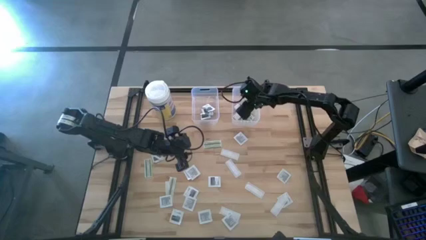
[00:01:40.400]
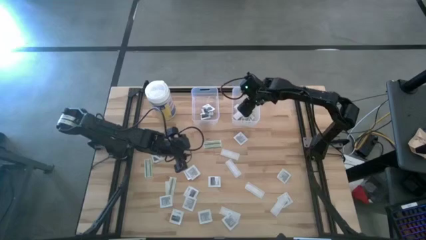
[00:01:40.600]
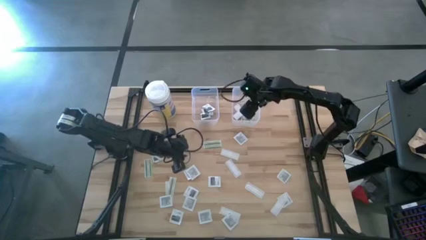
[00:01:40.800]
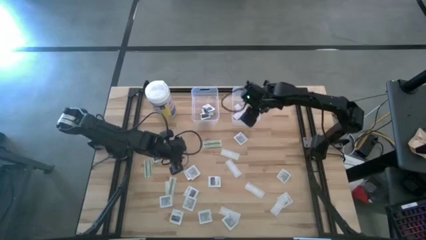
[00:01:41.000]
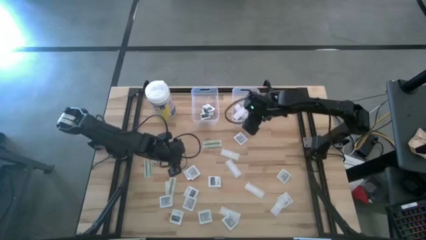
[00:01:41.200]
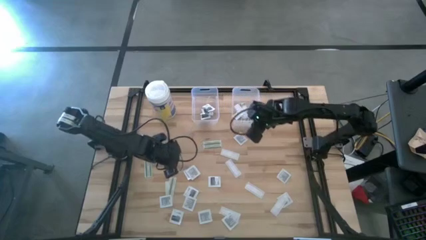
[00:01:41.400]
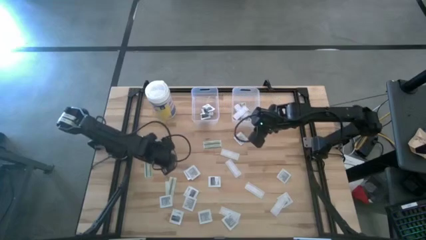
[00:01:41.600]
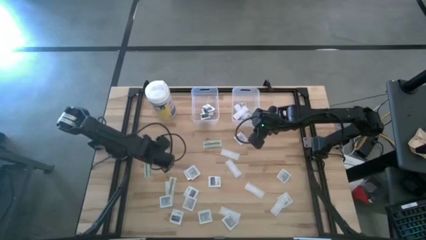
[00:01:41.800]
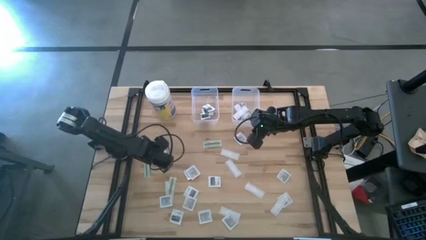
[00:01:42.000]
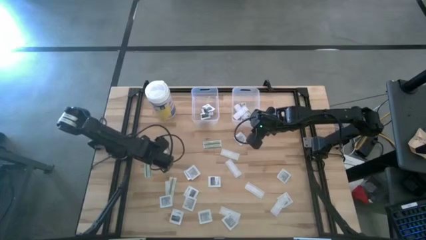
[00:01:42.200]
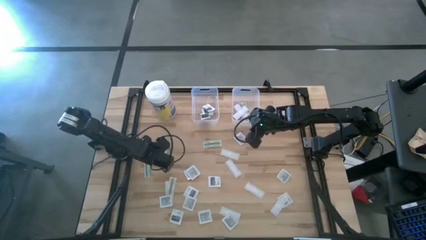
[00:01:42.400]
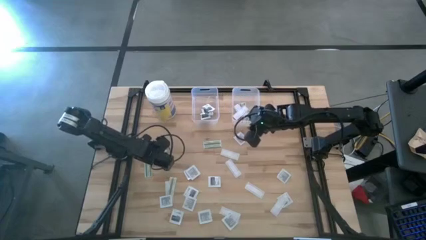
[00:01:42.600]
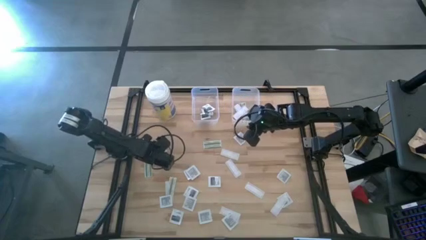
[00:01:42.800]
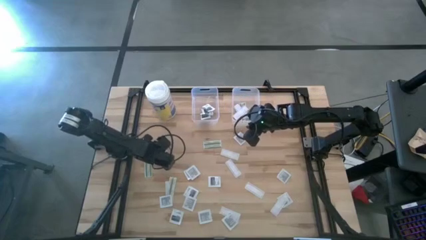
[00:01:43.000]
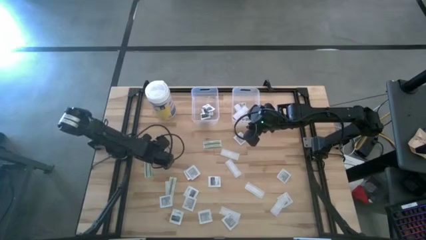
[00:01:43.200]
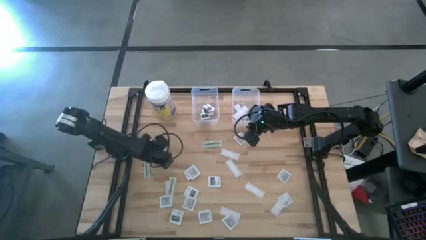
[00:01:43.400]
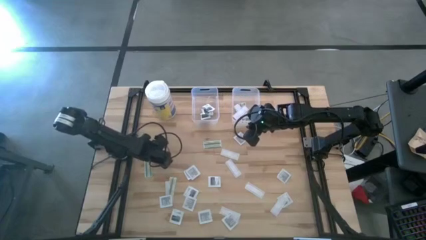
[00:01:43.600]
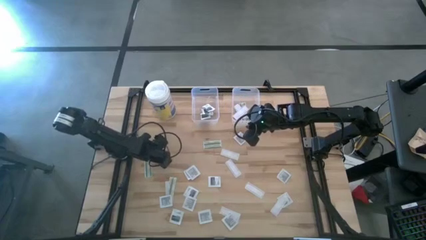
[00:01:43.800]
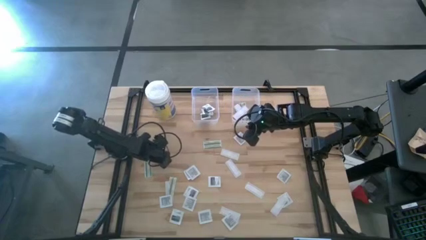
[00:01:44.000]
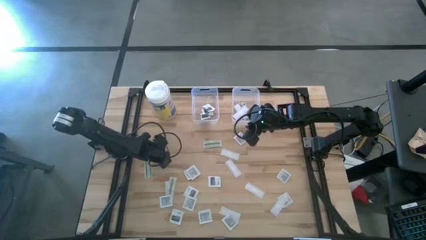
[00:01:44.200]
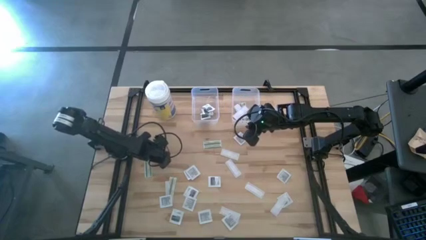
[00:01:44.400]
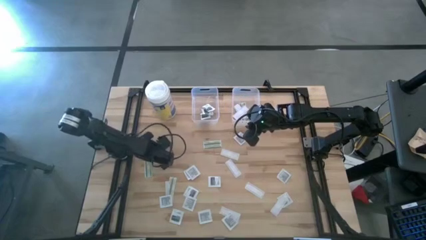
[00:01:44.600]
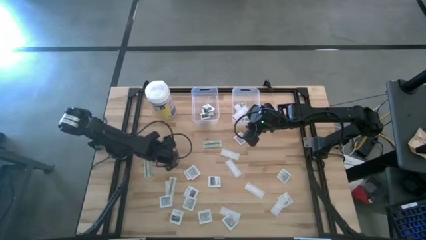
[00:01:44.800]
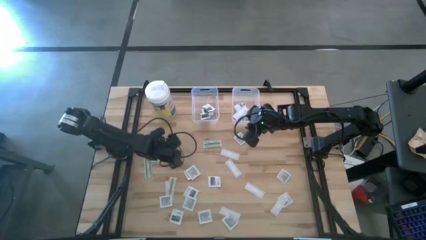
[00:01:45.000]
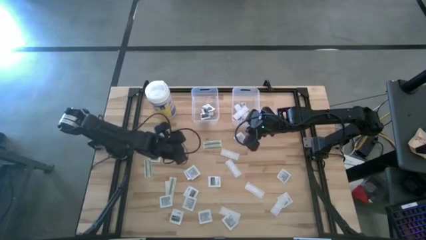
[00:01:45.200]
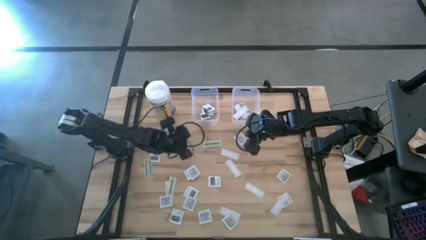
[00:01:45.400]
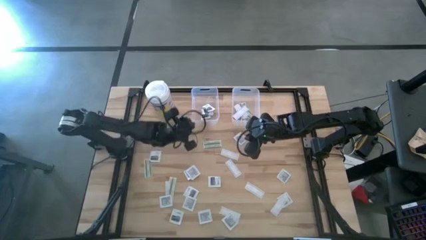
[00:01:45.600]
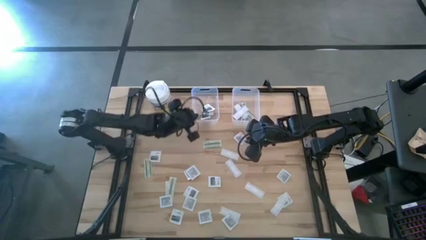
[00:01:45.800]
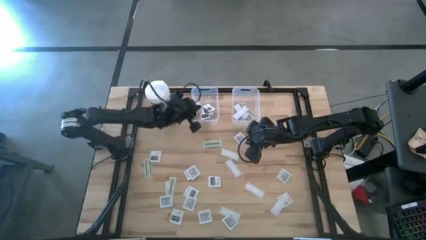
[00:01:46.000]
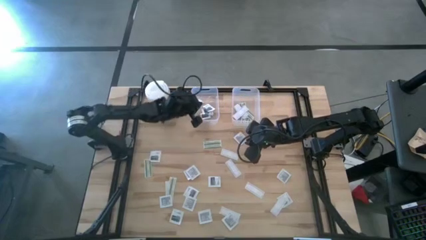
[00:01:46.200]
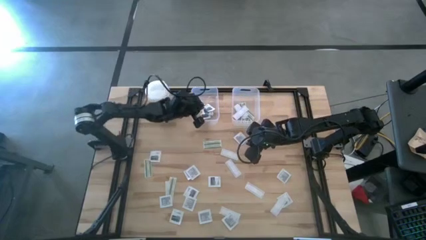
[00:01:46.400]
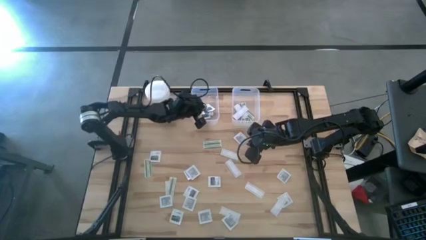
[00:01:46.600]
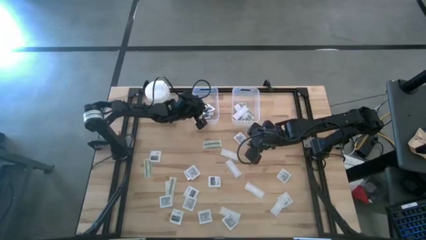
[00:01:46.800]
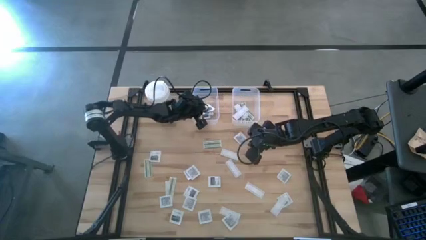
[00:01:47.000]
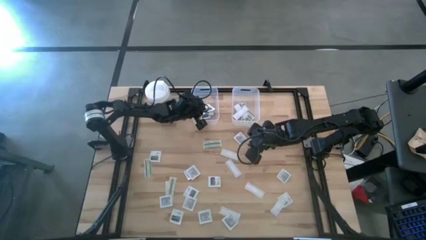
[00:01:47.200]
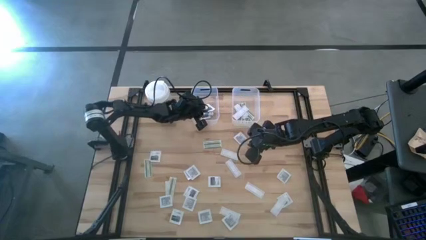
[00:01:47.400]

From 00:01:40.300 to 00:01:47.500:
Task: Pick & Place First Aid Supplies
Put the towelette pack into the left transparent bin

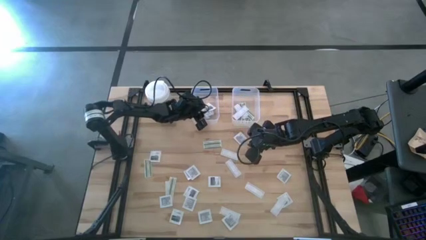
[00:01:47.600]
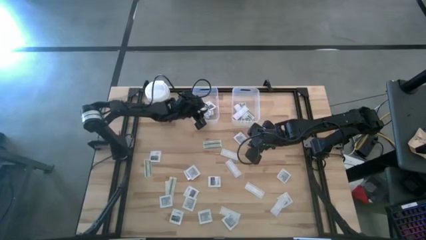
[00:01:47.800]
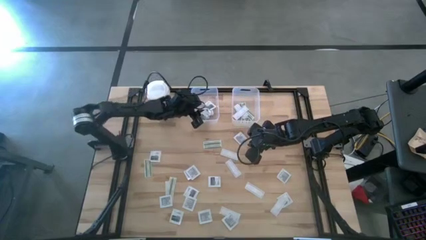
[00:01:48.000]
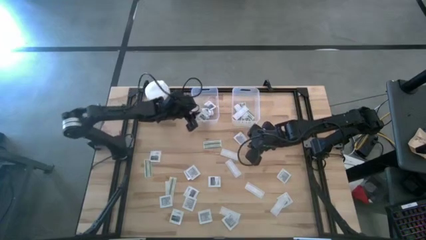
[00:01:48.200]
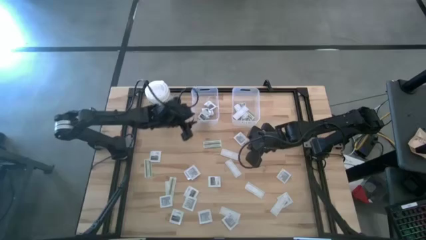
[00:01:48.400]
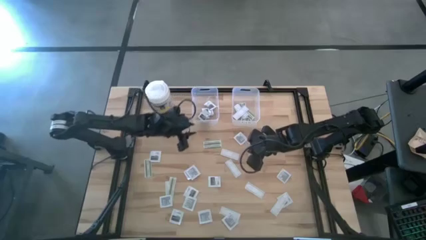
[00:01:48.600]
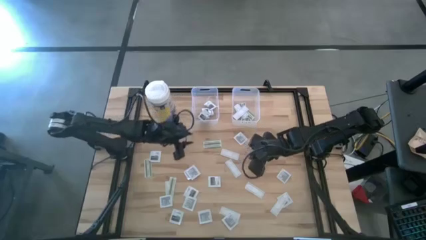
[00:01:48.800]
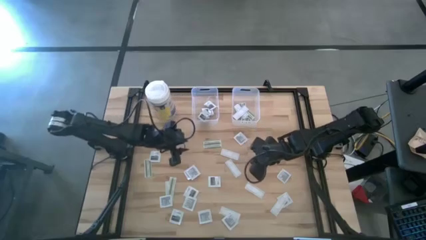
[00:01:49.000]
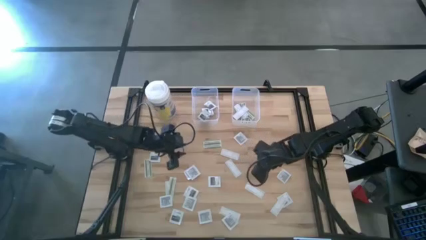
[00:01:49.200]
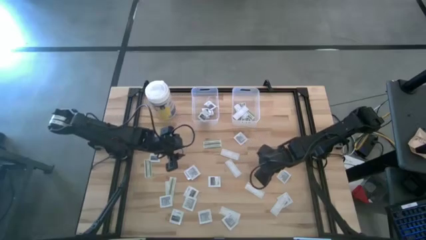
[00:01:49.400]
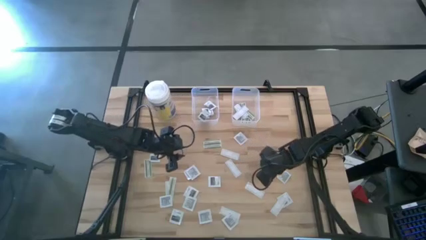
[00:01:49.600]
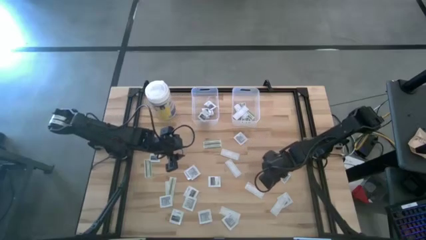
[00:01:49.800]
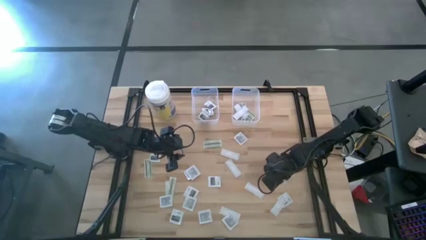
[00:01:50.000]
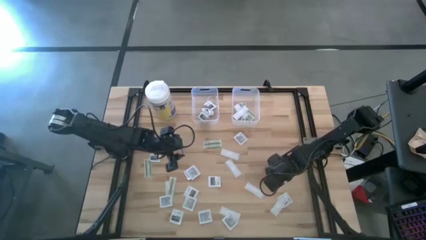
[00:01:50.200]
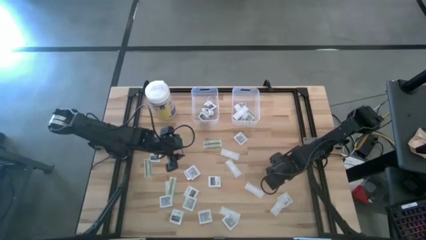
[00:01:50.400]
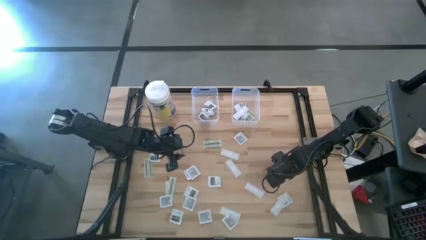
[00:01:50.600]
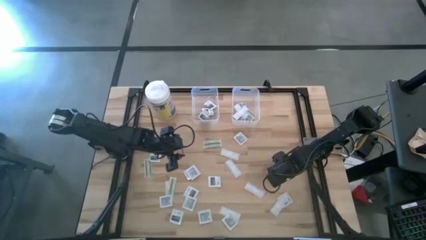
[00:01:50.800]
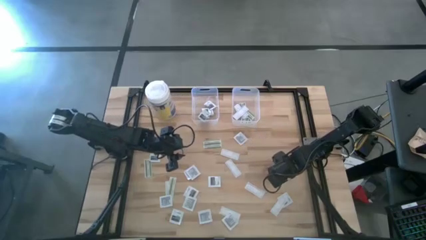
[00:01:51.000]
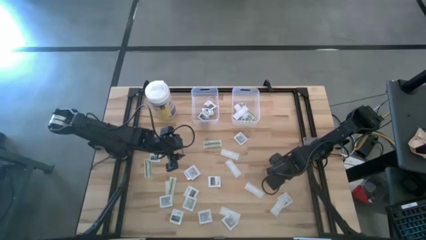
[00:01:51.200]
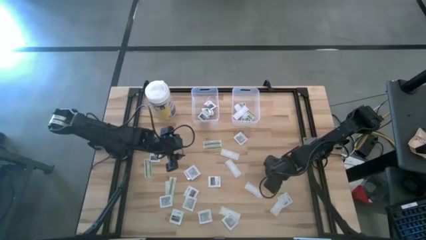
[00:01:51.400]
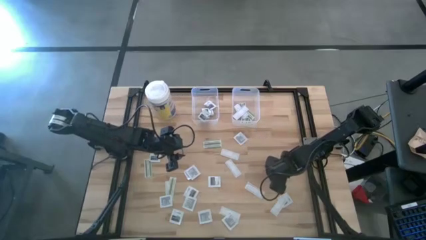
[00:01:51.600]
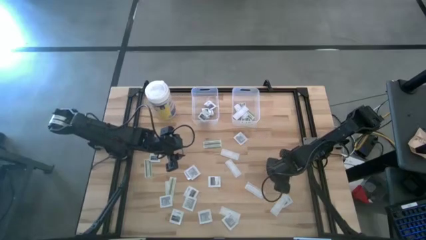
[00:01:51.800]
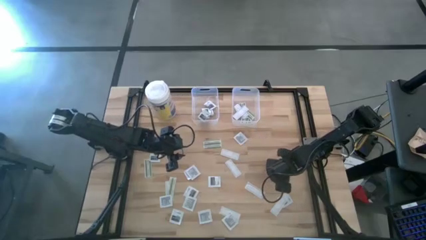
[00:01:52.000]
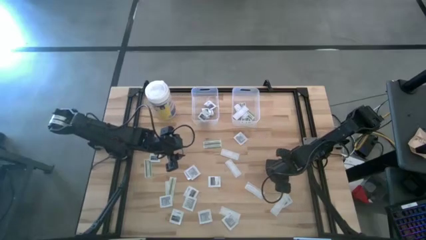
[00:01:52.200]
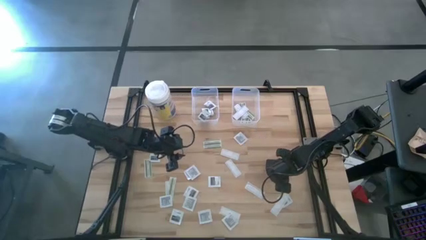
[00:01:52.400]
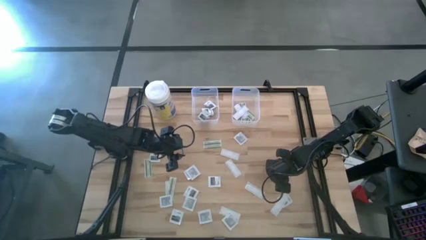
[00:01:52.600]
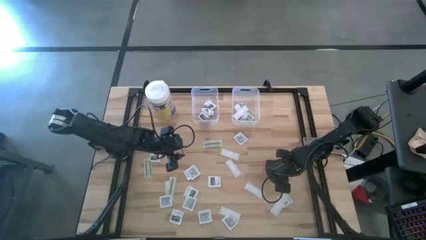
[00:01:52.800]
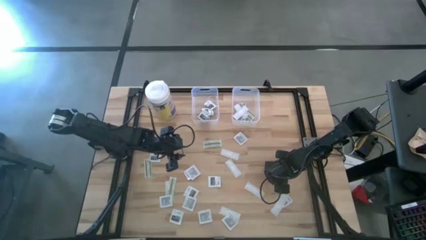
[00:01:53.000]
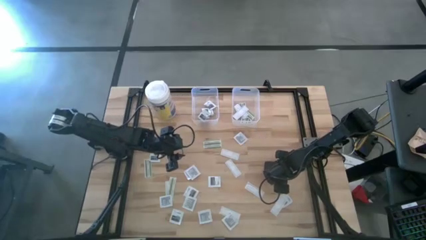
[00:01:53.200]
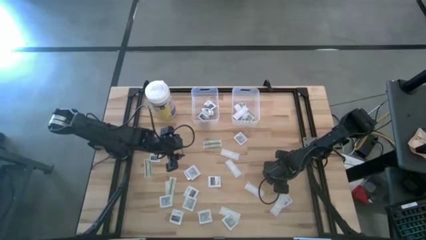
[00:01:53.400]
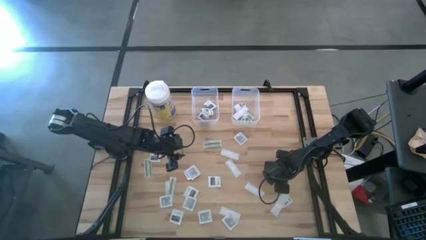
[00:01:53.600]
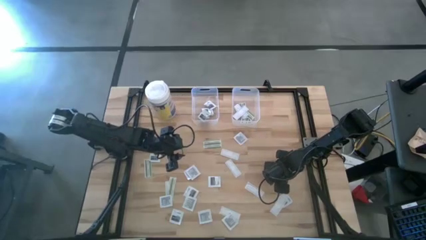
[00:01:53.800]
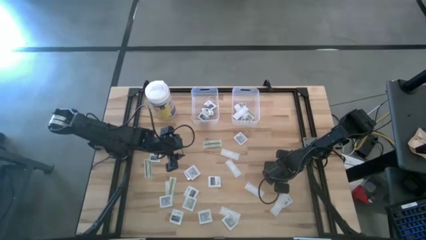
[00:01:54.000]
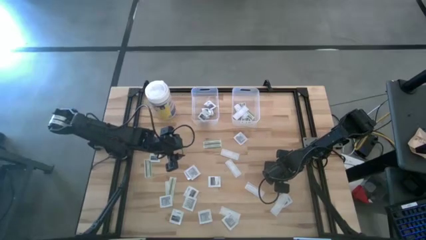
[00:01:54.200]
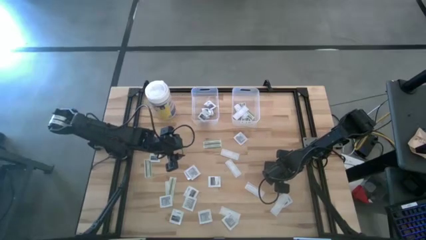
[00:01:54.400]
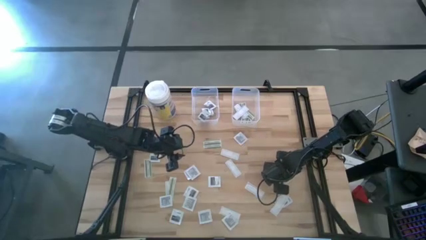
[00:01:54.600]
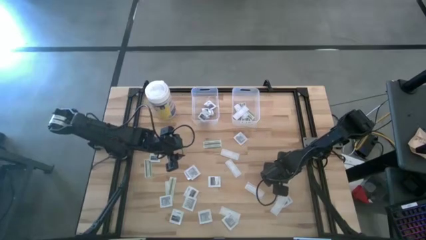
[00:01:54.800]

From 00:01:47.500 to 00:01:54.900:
Put the towelette pack into the left transparent bin
